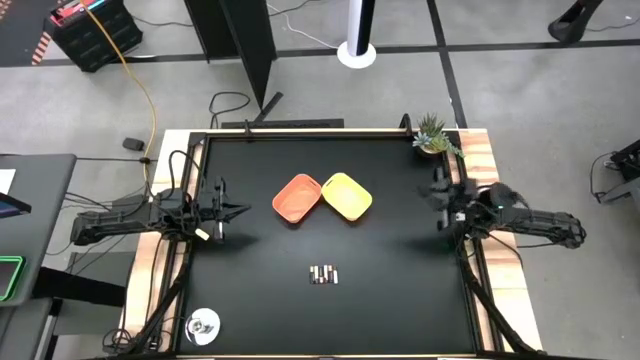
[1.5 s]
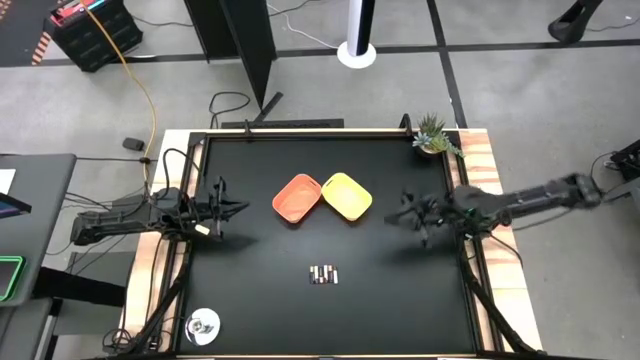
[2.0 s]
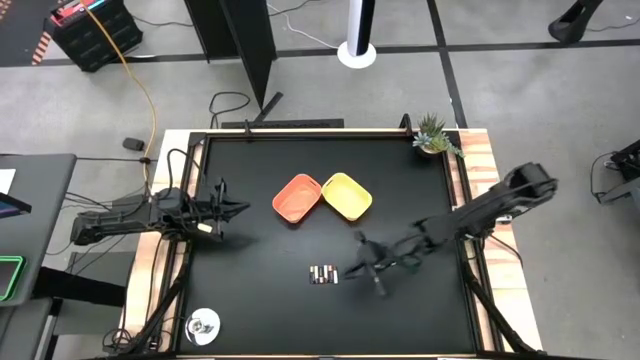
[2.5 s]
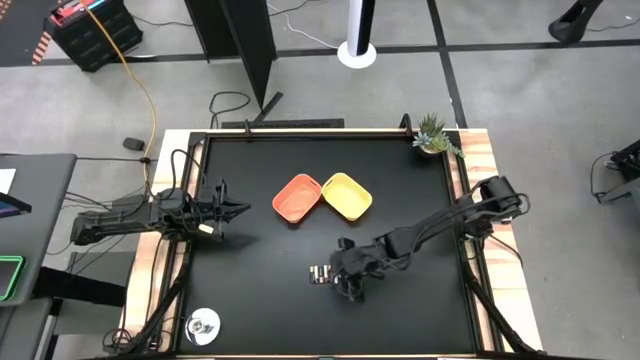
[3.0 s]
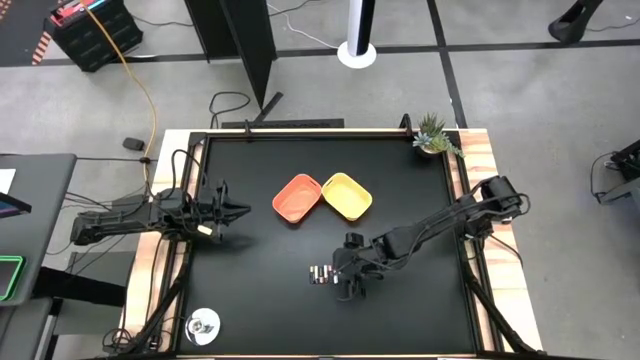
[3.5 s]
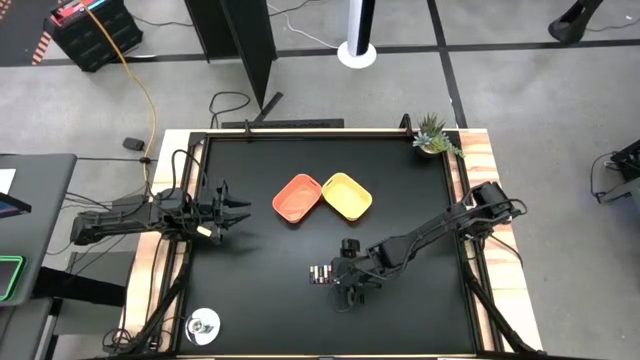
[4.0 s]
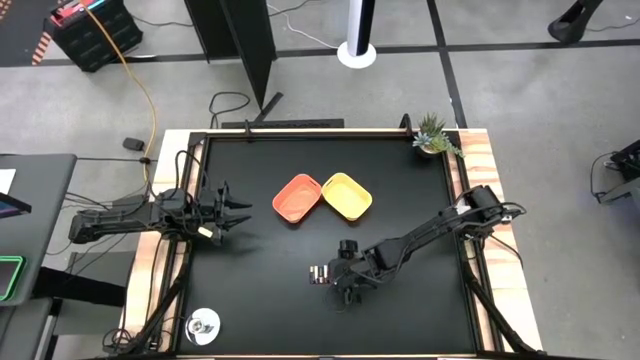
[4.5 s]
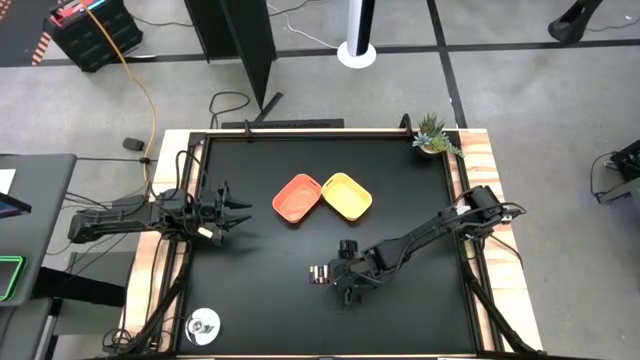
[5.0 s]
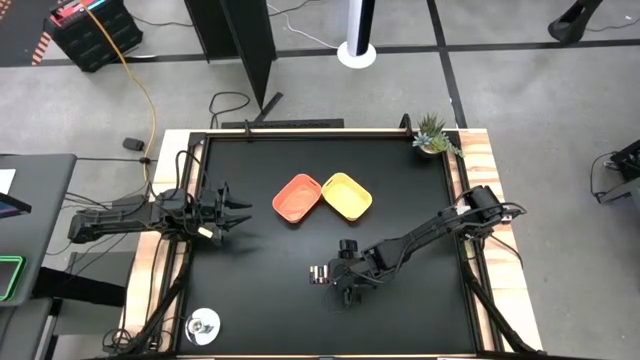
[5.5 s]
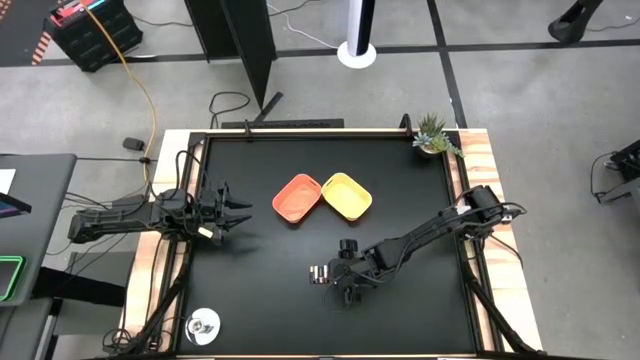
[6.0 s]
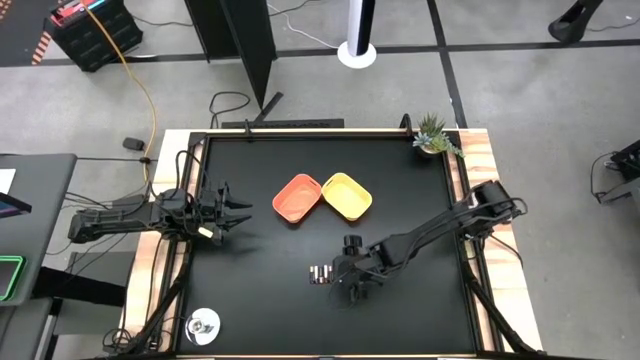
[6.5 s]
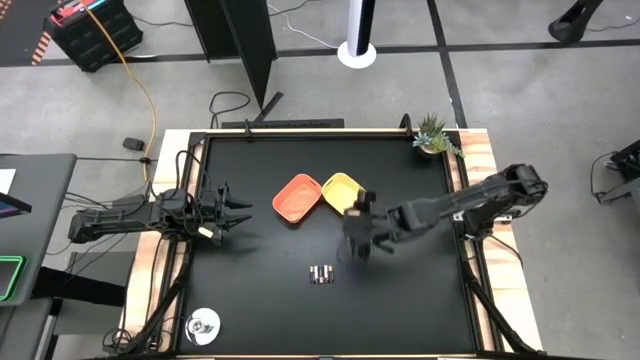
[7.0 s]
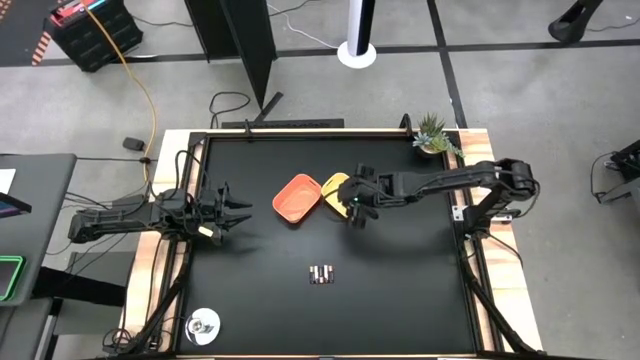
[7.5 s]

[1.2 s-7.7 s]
Task: Sort batteries
Put the white battery into the yellow bin

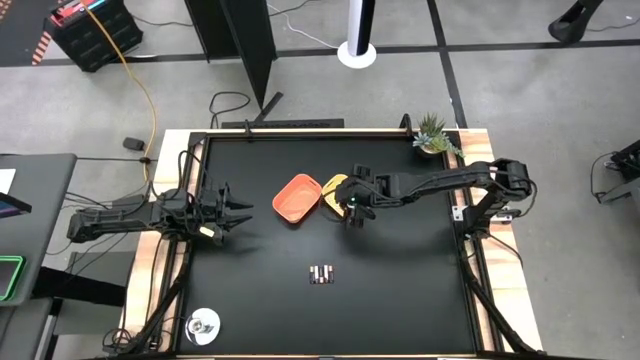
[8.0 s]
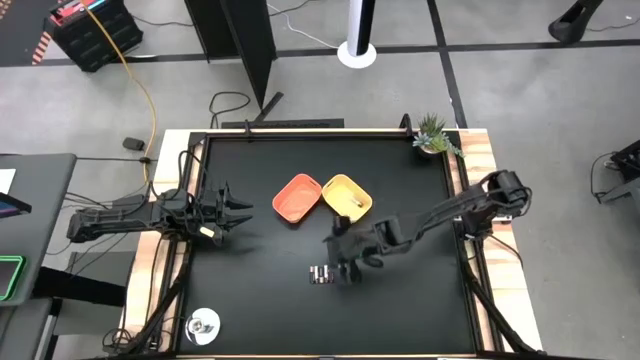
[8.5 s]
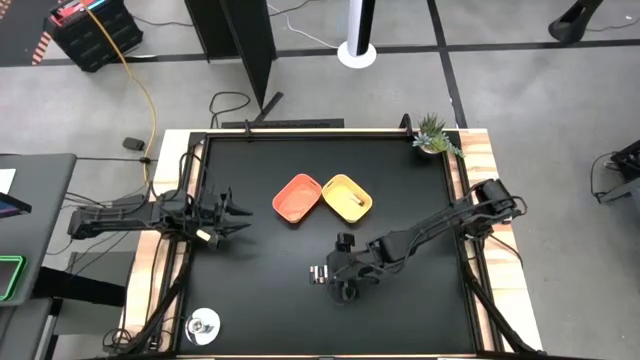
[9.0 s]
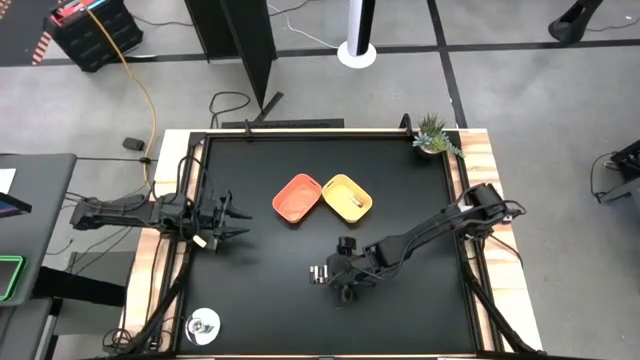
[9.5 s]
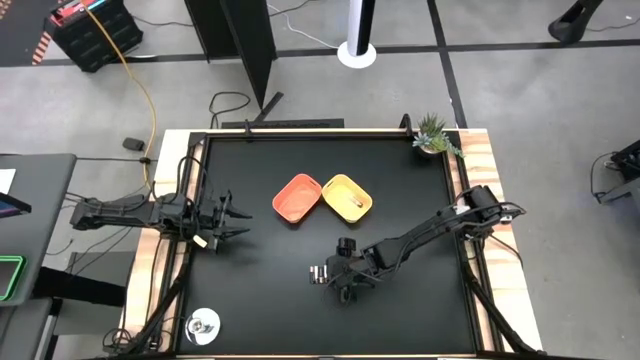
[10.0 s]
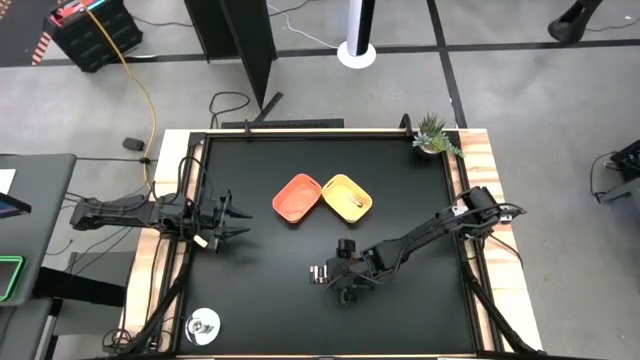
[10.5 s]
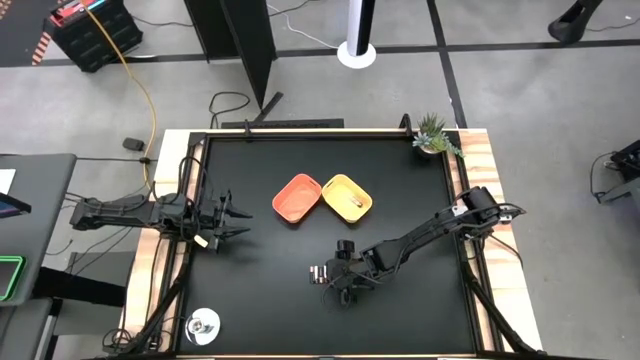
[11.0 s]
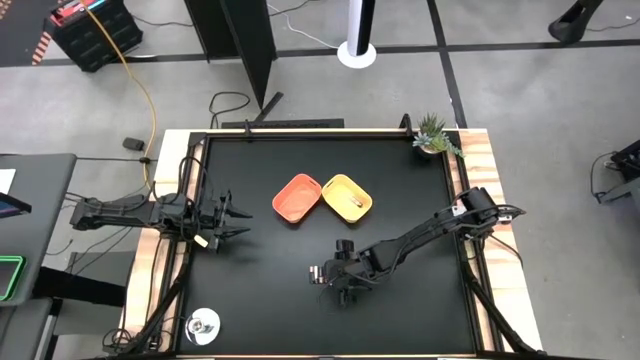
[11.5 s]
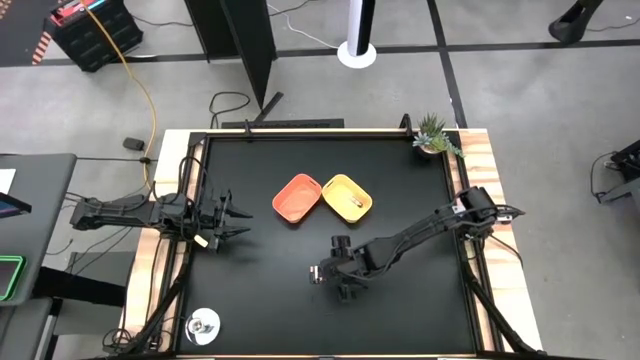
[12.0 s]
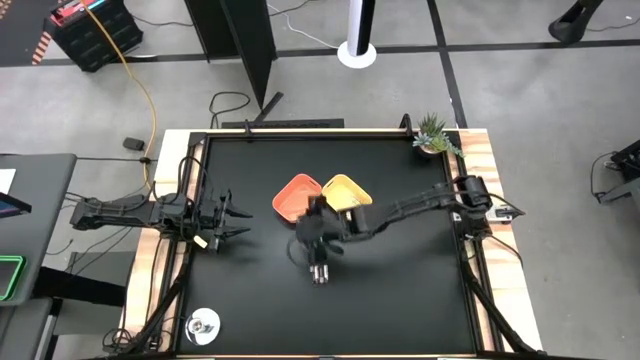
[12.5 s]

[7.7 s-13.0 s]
Put the black battery into the orange bin

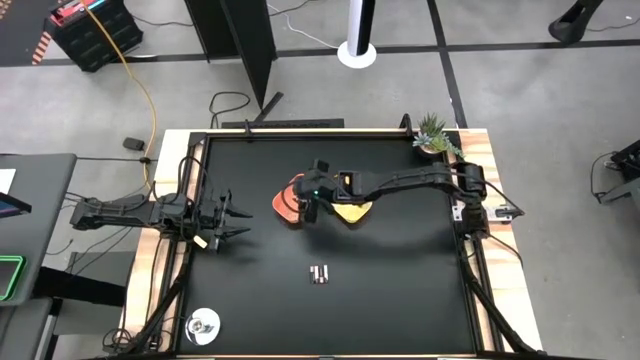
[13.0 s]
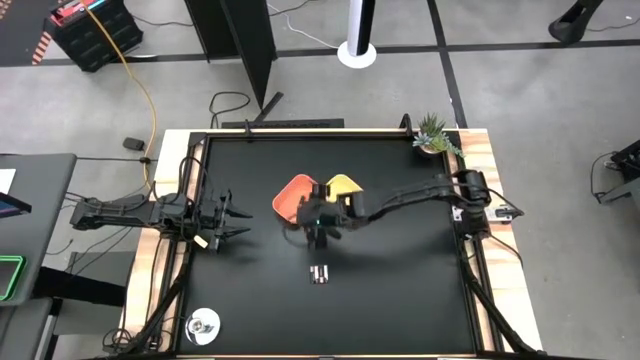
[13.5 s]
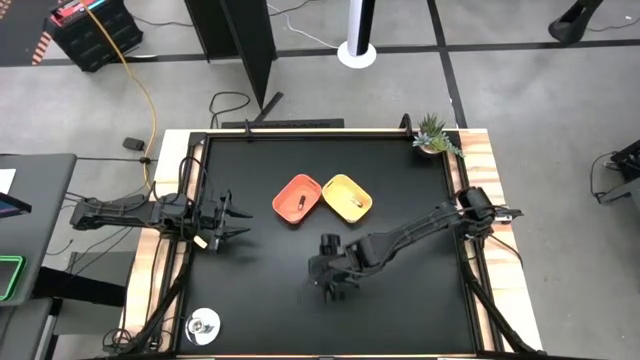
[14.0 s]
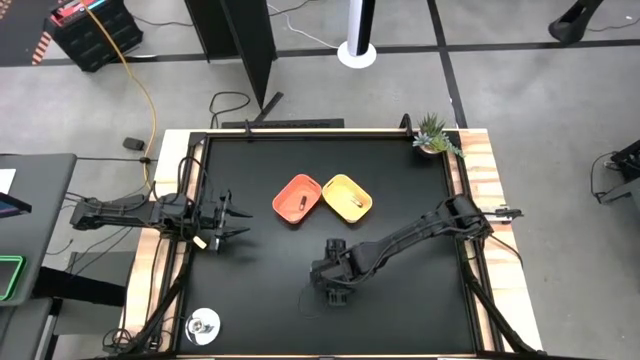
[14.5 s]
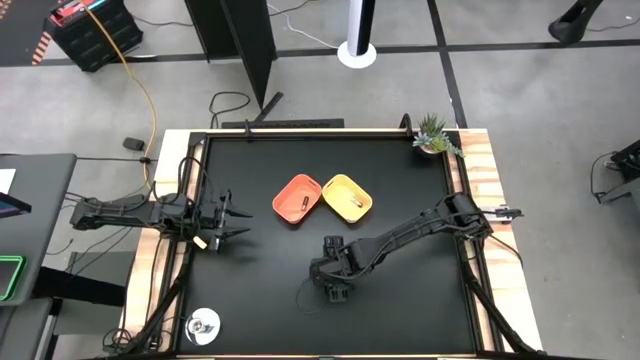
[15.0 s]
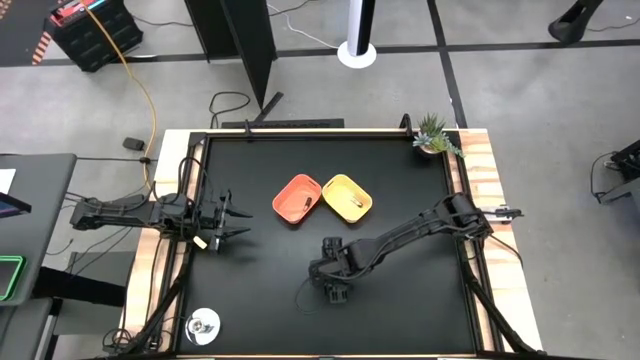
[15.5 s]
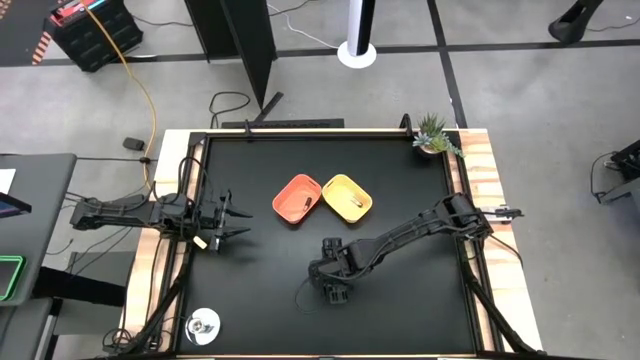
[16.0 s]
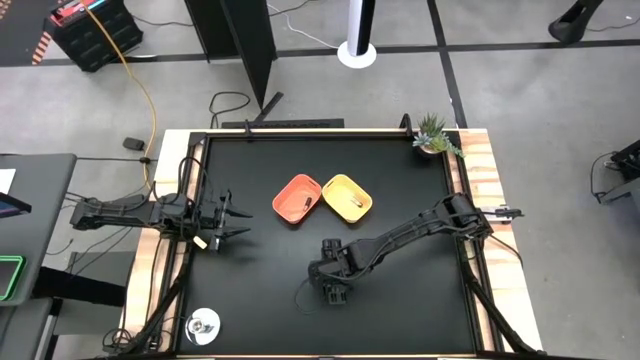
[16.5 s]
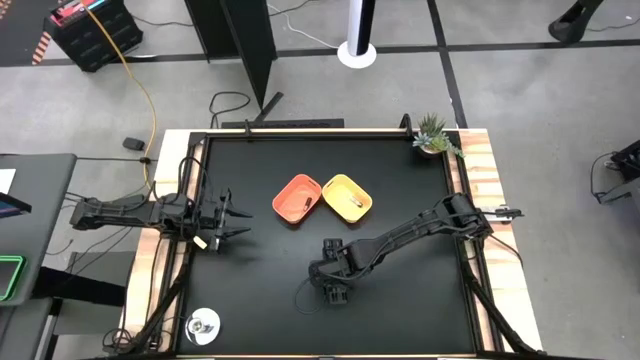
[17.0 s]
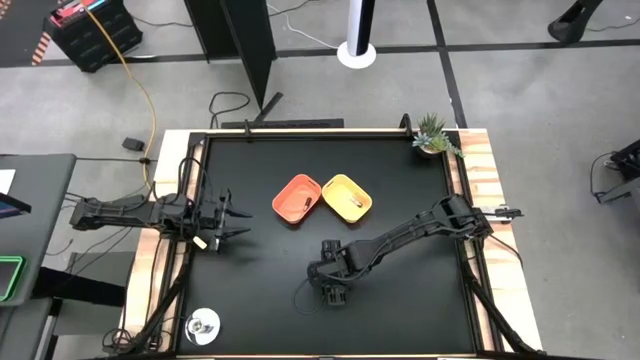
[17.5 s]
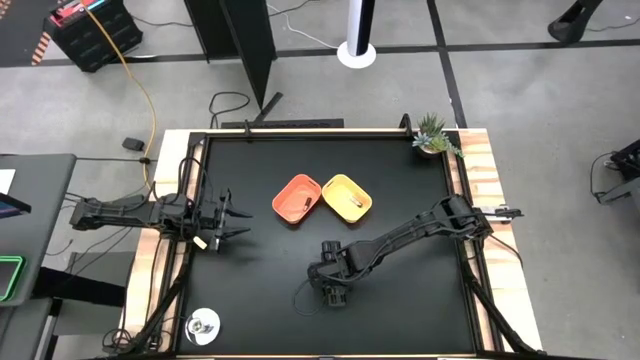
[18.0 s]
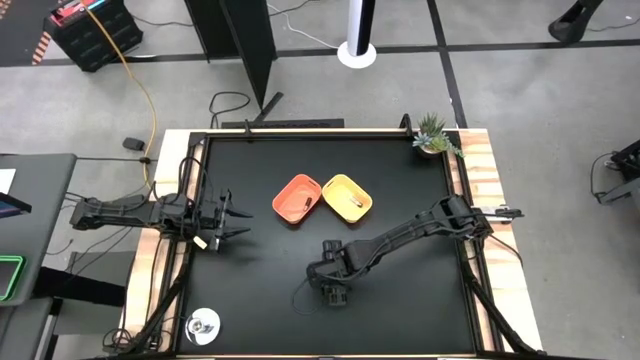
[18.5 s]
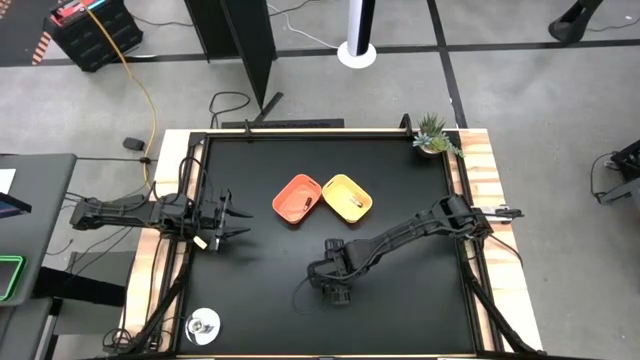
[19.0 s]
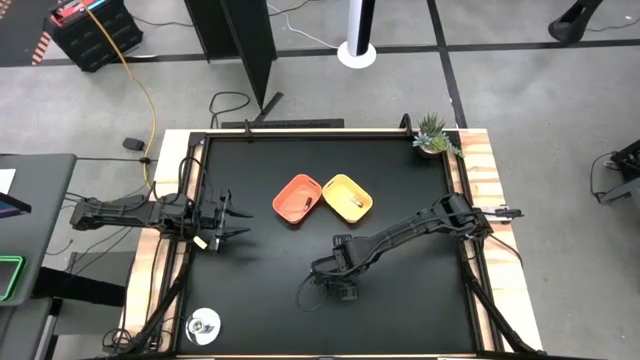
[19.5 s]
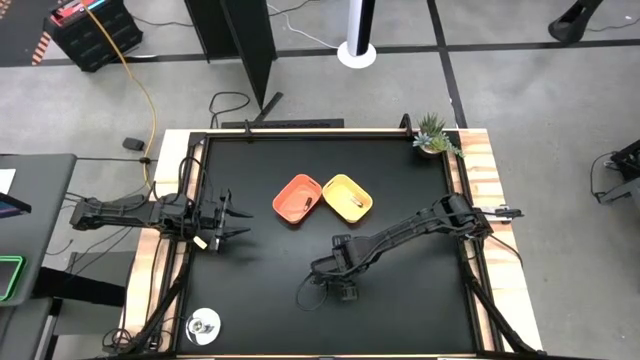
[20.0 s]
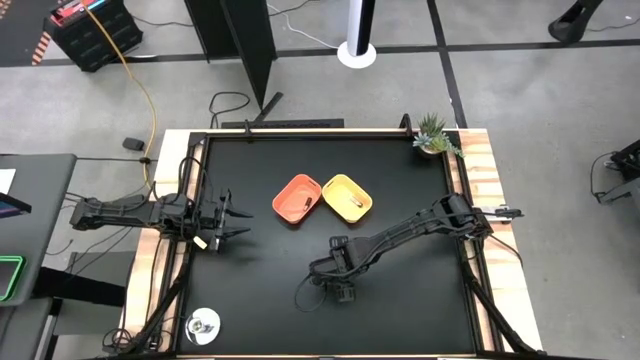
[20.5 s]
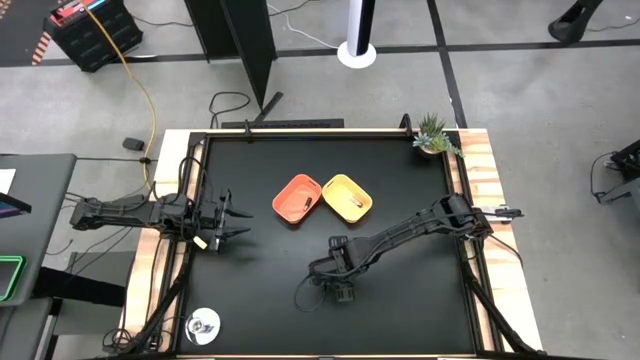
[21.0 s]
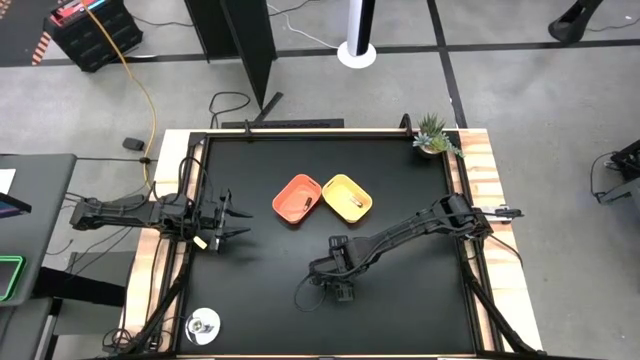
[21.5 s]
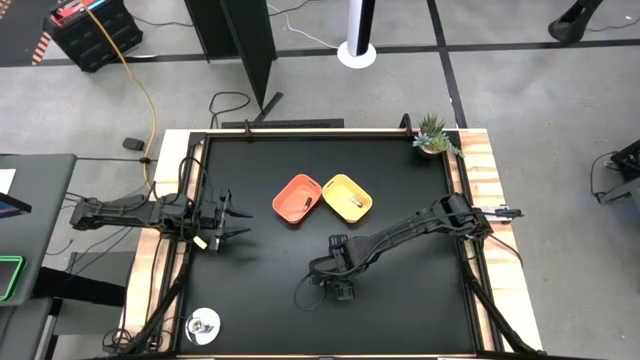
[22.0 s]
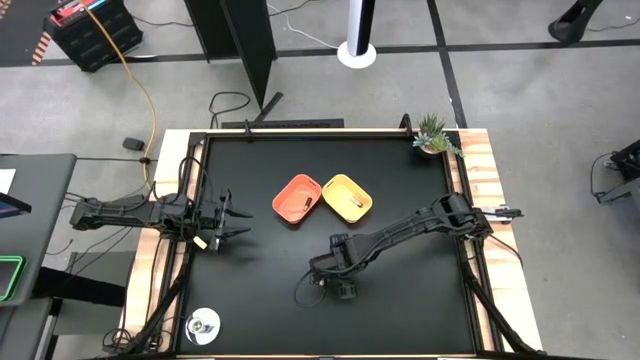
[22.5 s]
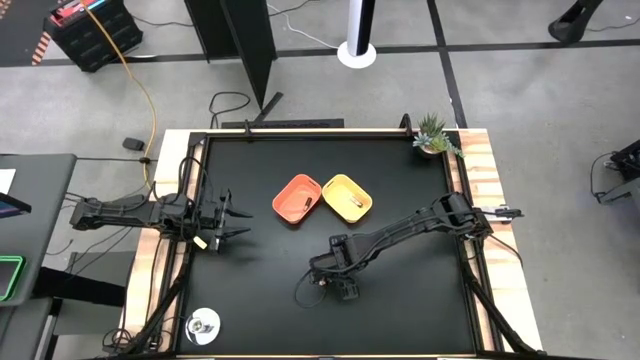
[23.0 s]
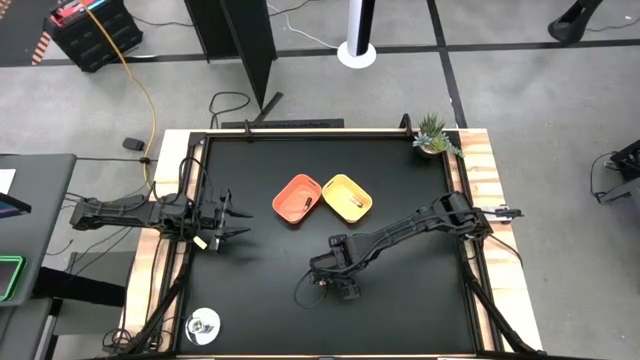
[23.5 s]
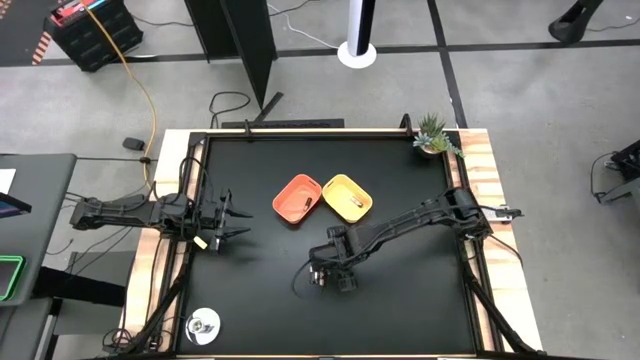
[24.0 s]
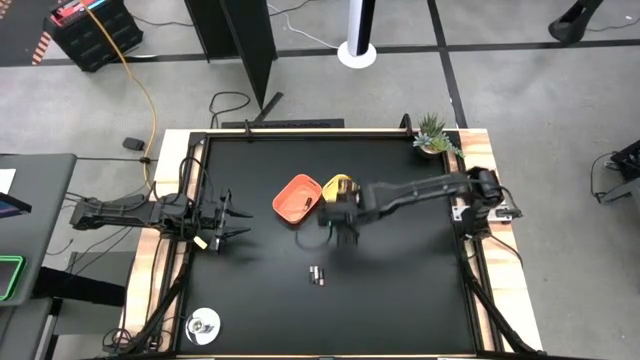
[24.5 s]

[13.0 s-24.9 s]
Put the white battery into the yellow bin
